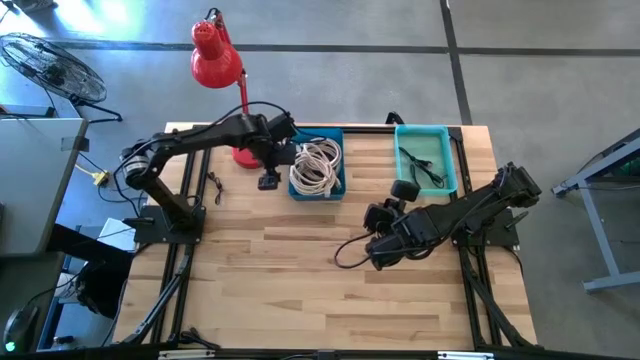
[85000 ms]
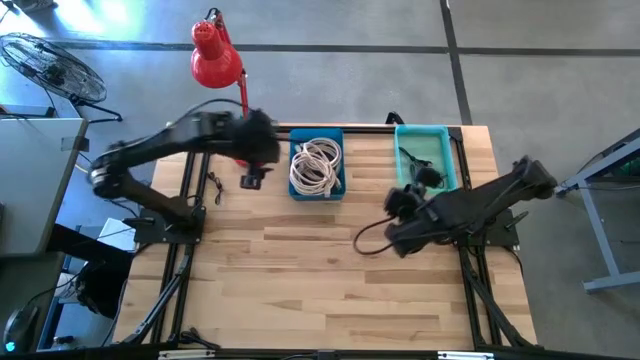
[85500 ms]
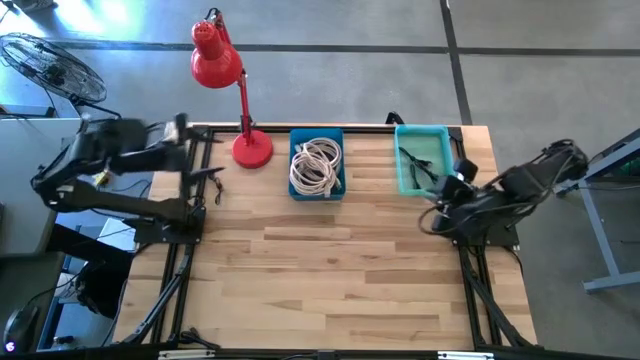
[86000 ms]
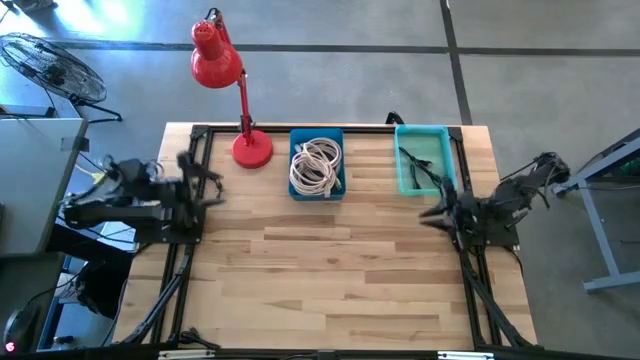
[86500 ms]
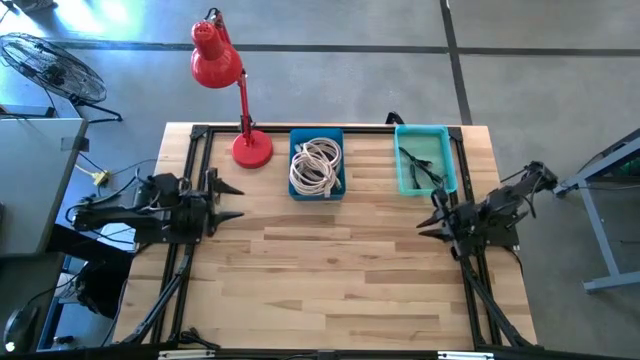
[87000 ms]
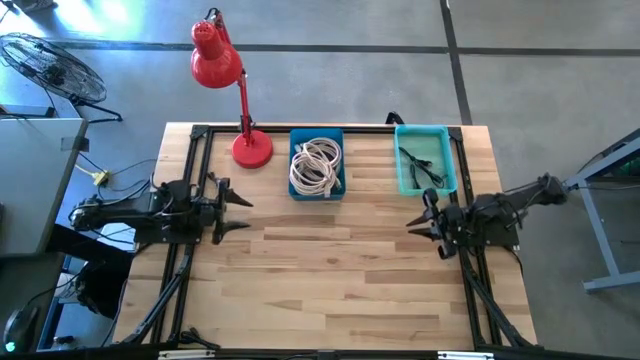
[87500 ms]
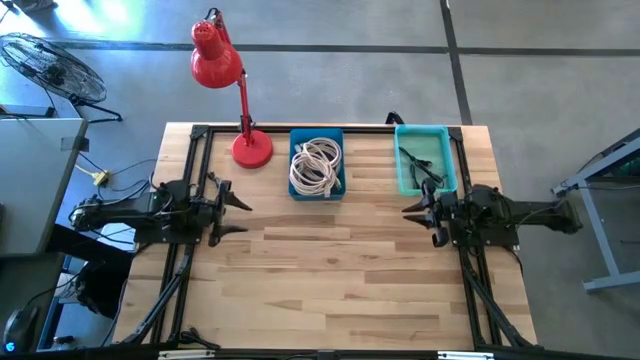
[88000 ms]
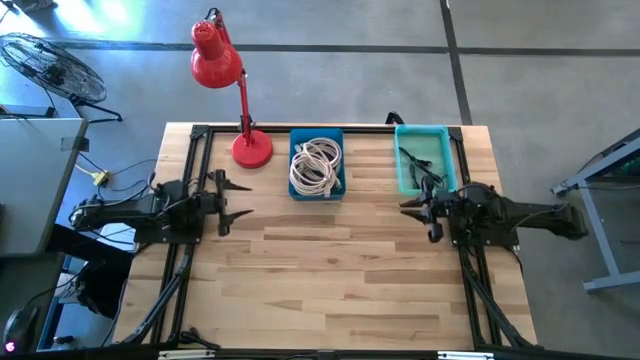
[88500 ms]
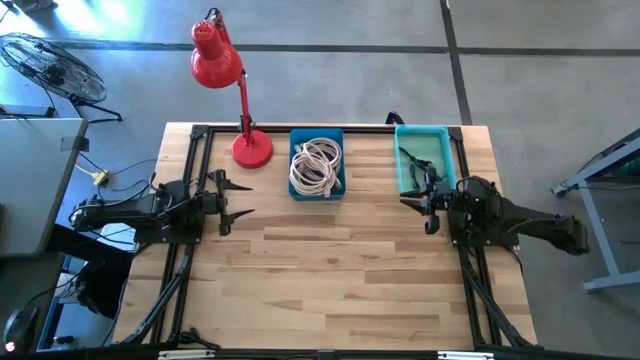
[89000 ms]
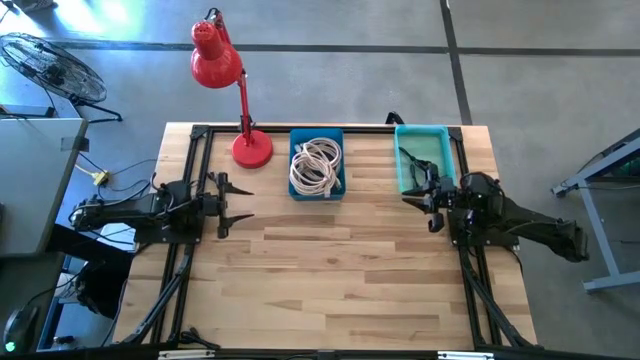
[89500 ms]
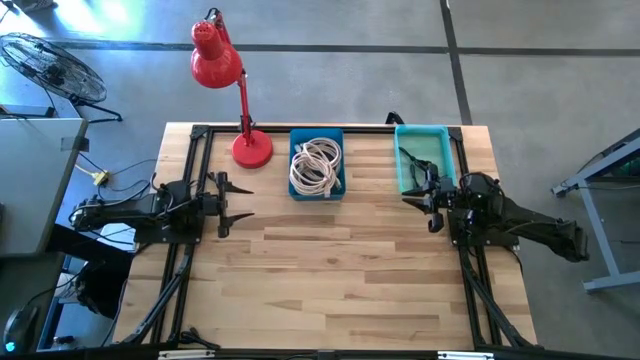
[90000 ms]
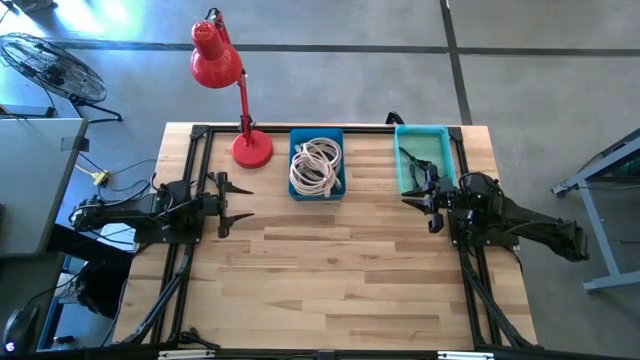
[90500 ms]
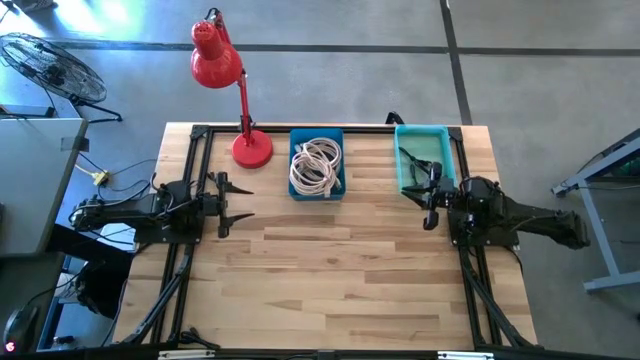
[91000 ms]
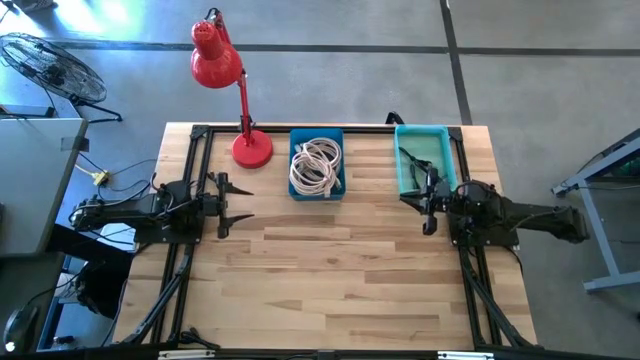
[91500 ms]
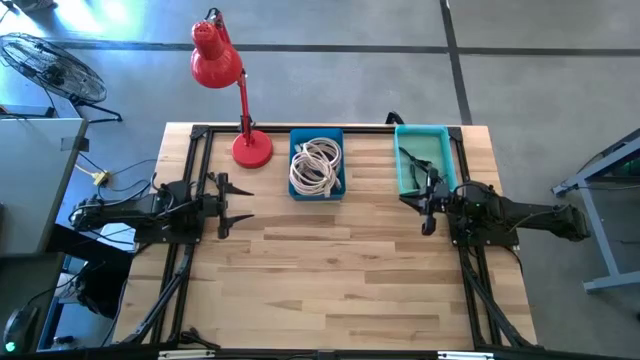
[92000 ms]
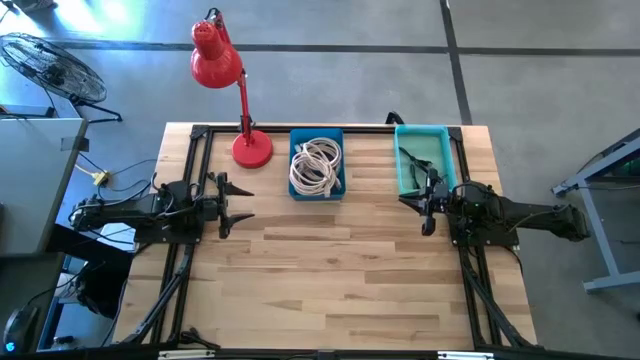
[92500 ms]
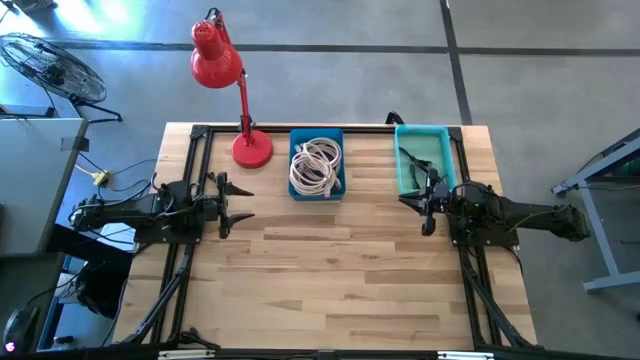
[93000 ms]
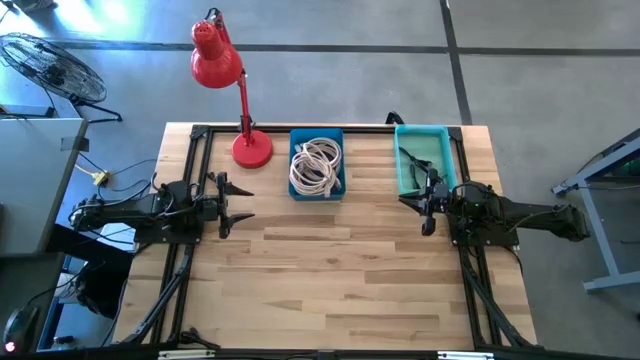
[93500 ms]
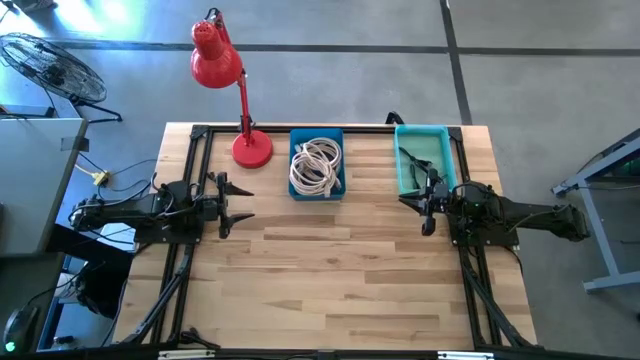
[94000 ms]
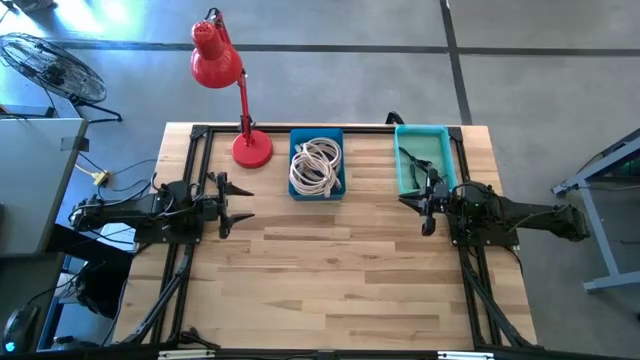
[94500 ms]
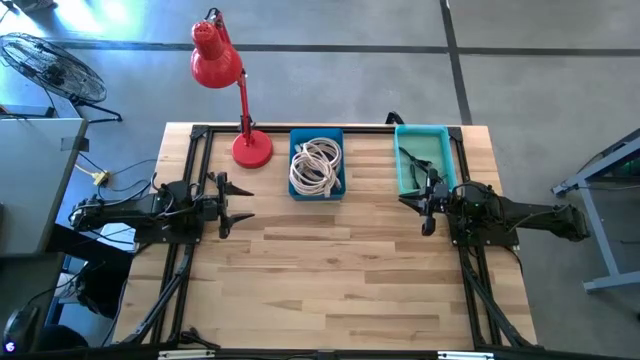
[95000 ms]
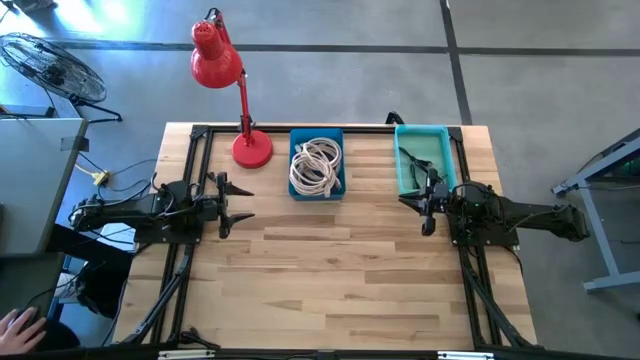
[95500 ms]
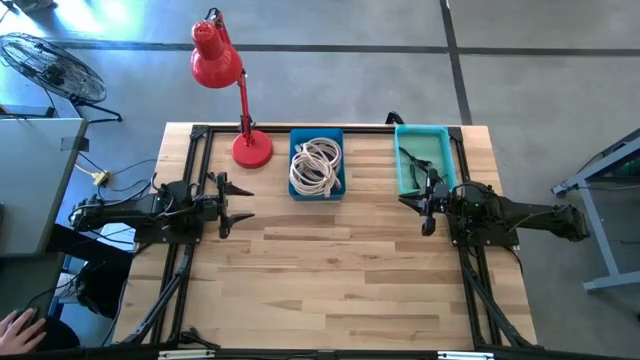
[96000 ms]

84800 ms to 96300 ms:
Task: Pick & Place USB Port
Return to Home Position

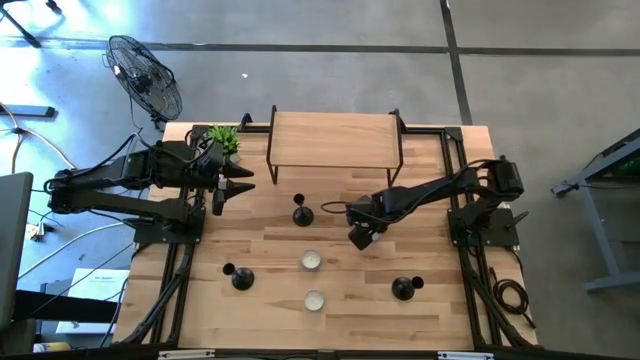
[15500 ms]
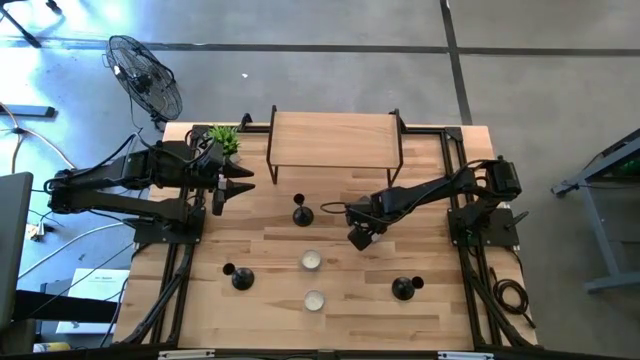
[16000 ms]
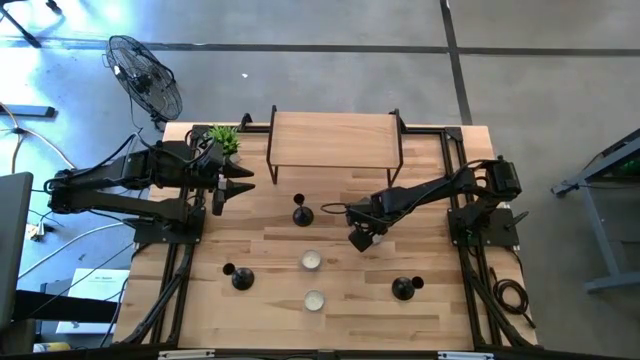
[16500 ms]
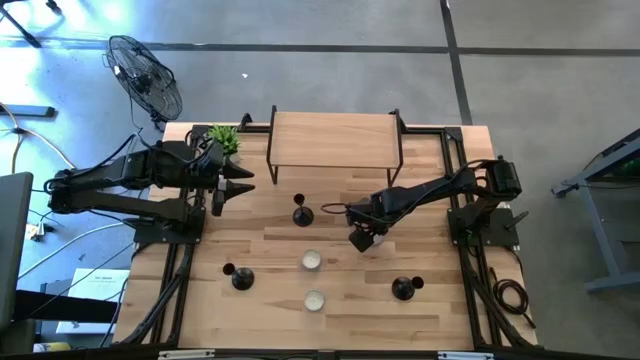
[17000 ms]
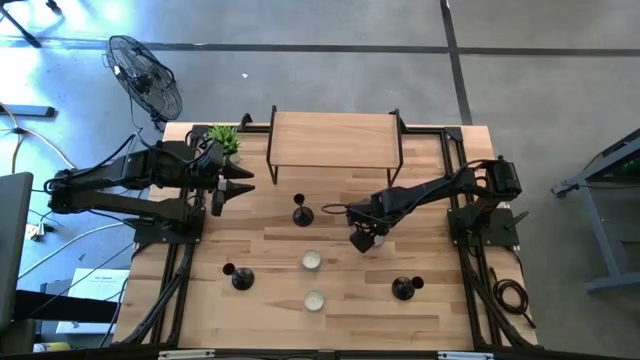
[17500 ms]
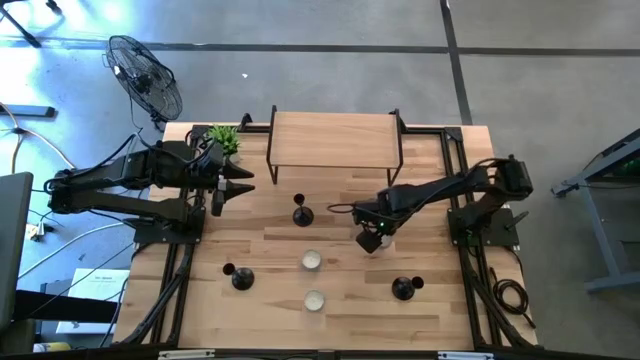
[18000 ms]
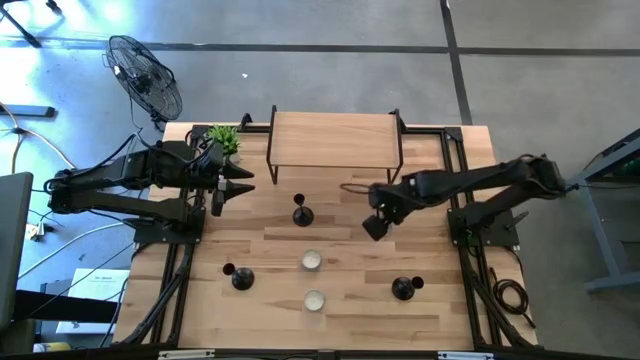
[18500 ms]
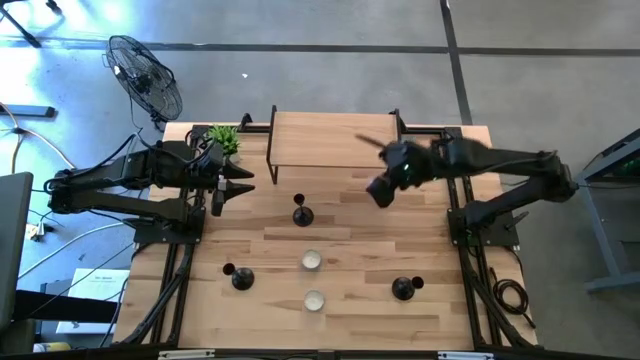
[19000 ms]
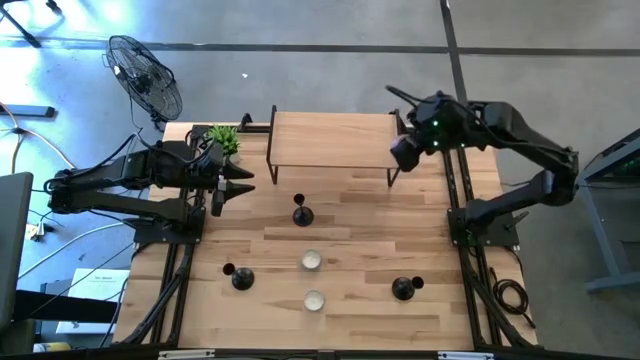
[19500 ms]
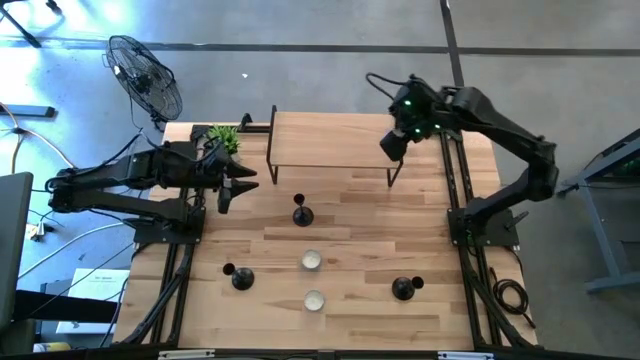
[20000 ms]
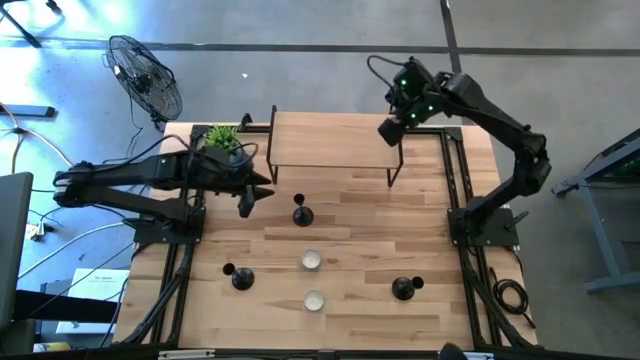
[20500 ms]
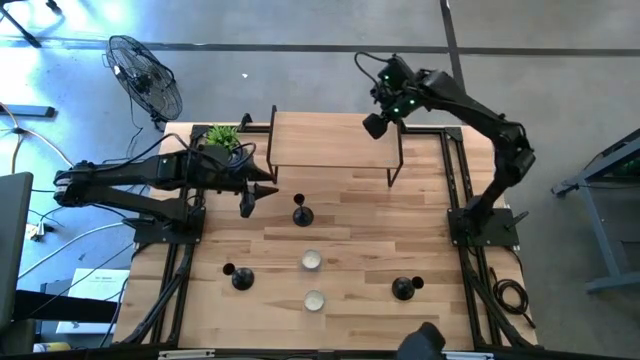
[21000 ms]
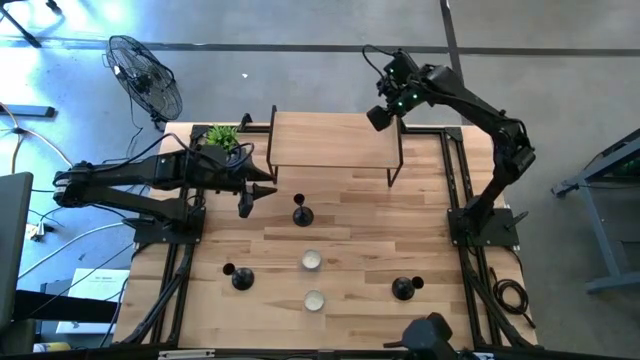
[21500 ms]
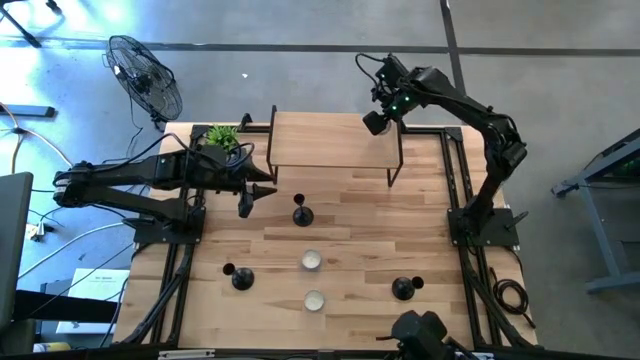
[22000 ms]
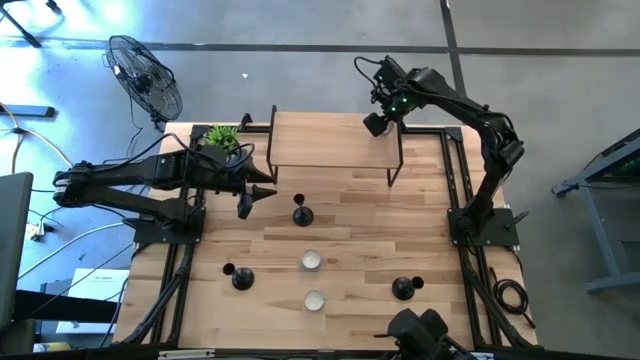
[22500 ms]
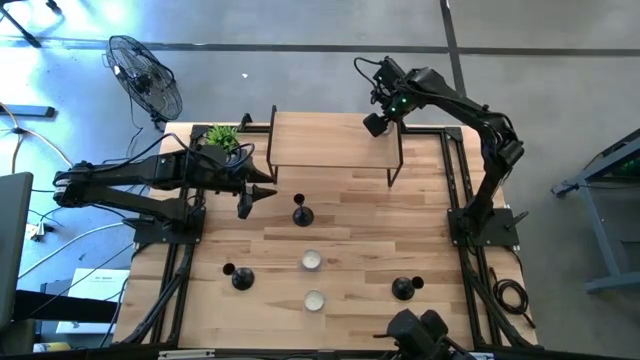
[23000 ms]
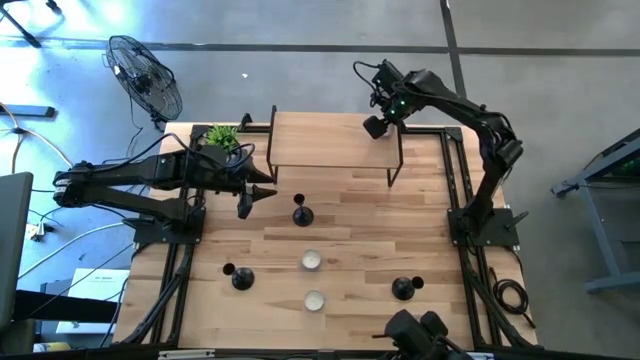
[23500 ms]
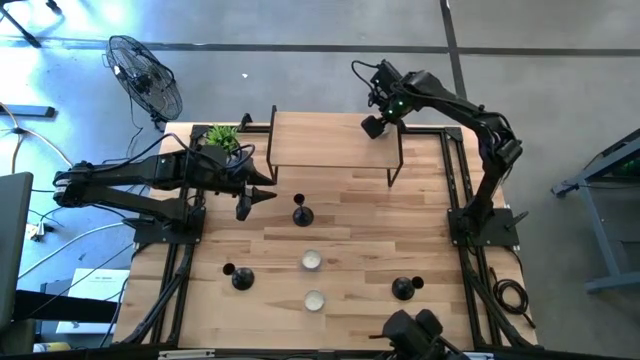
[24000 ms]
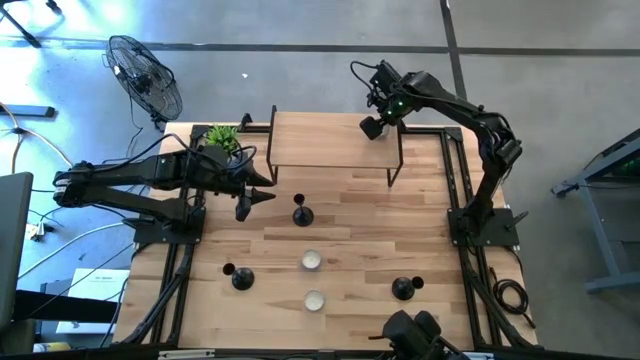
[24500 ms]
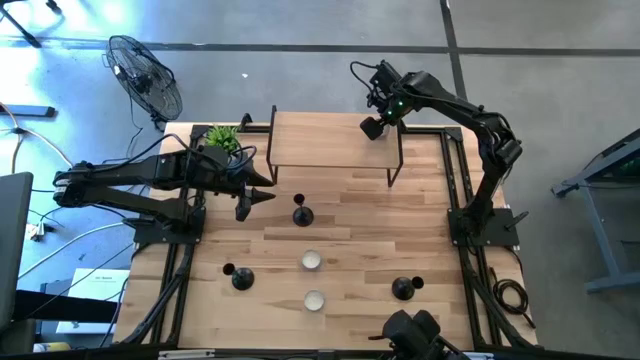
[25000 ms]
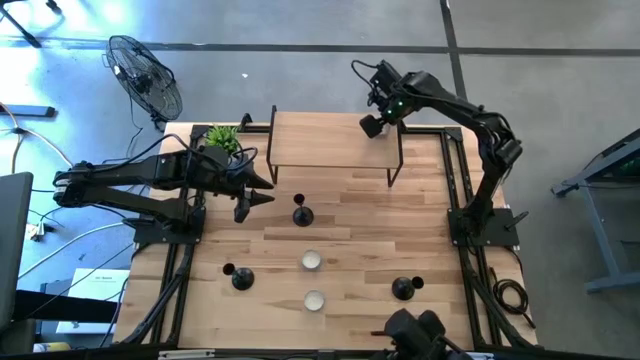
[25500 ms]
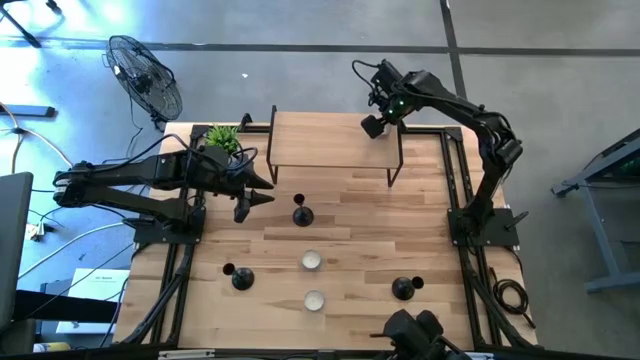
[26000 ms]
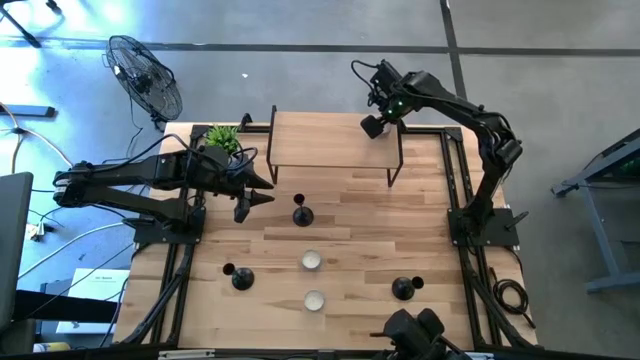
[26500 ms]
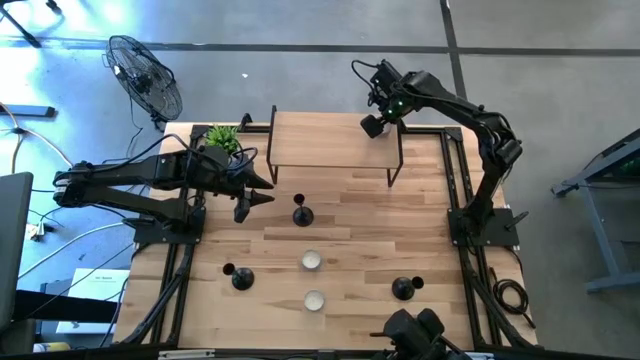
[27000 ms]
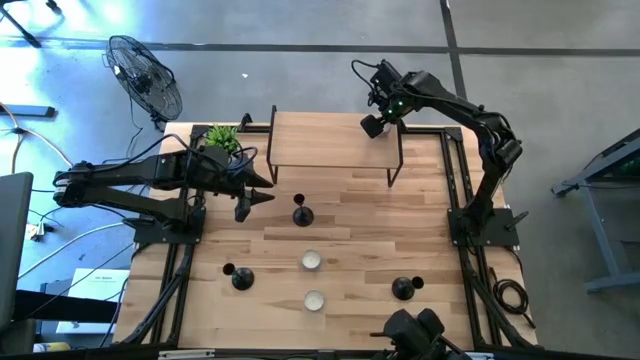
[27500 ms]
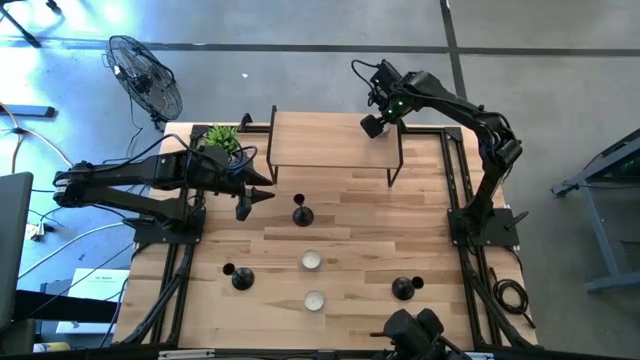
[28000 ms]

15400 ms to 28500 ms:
Task: Pick & Place candle stick holders
Put the top red patterned scented candle on the shelf
